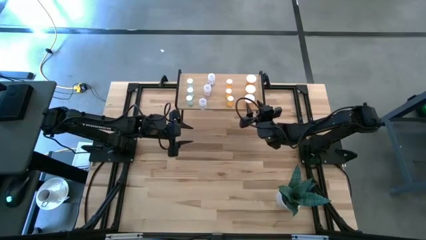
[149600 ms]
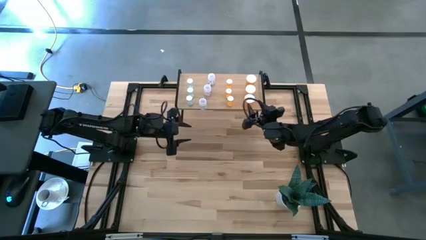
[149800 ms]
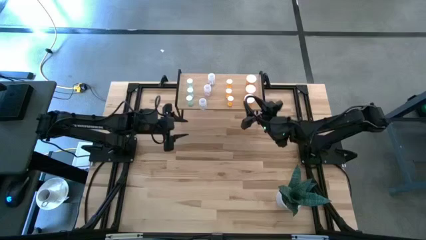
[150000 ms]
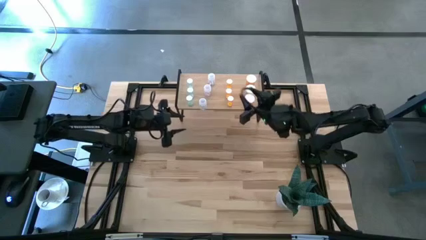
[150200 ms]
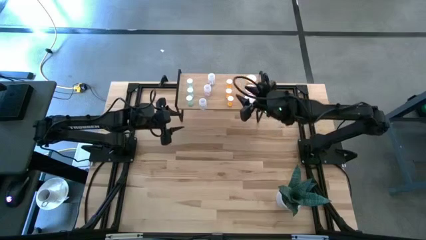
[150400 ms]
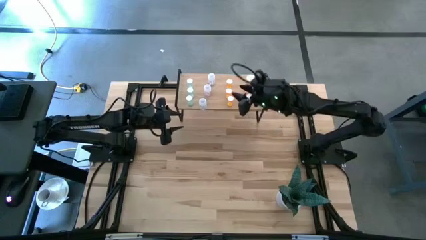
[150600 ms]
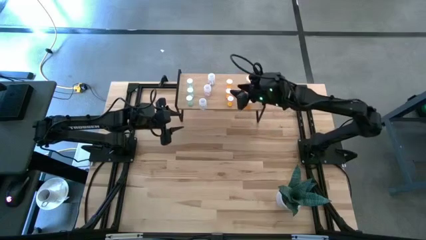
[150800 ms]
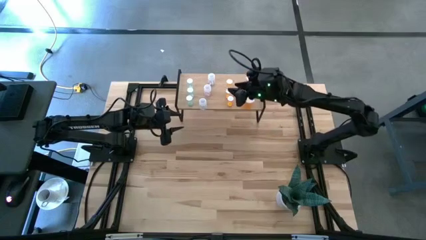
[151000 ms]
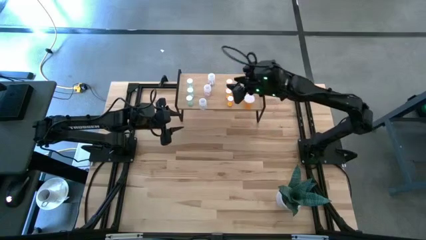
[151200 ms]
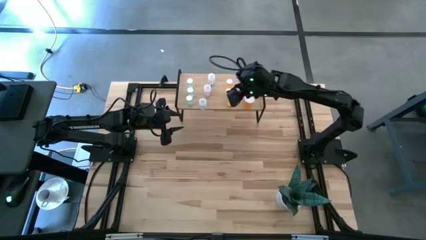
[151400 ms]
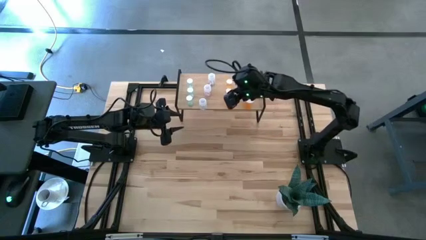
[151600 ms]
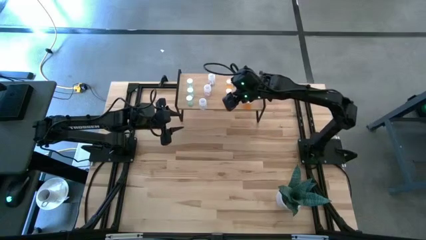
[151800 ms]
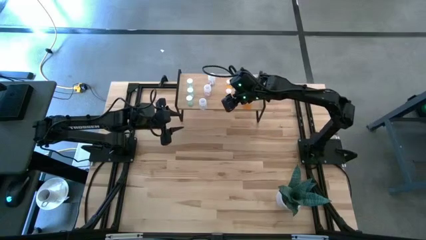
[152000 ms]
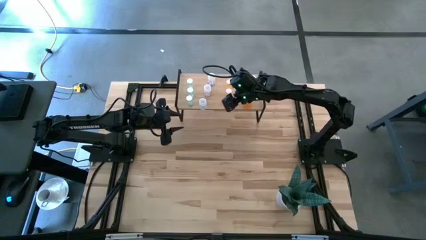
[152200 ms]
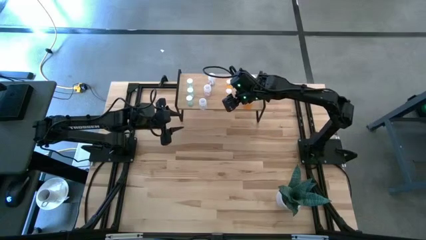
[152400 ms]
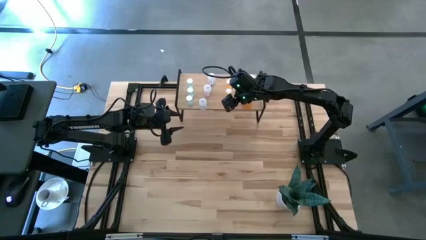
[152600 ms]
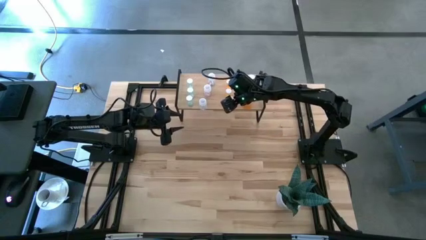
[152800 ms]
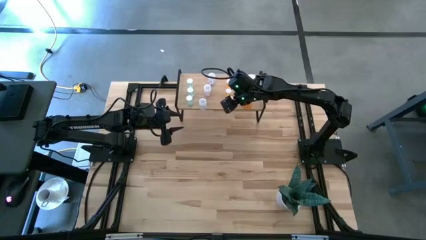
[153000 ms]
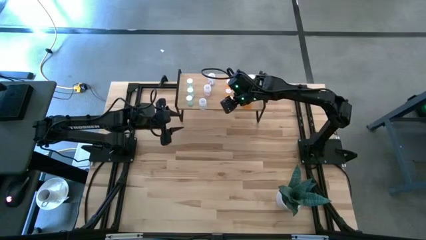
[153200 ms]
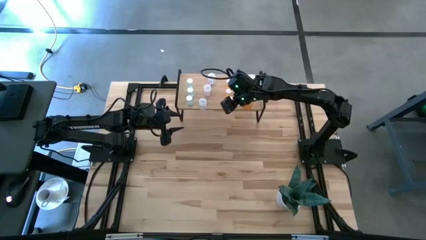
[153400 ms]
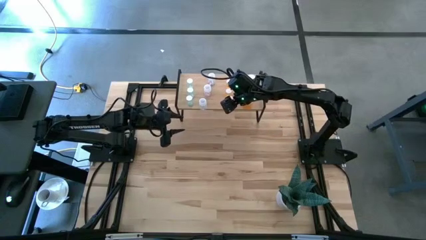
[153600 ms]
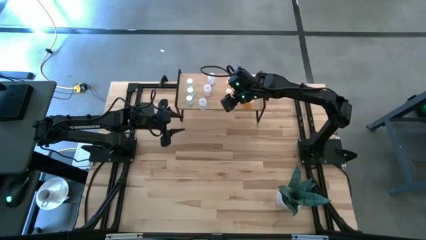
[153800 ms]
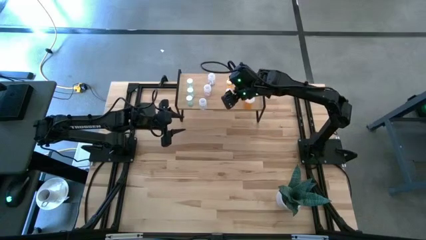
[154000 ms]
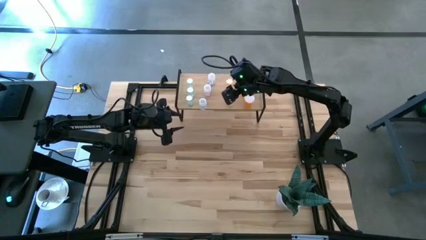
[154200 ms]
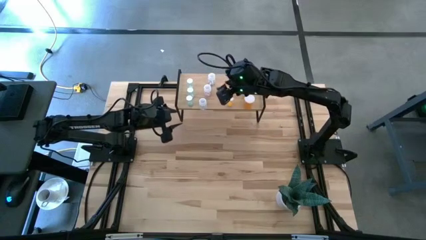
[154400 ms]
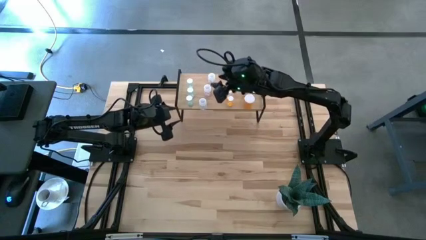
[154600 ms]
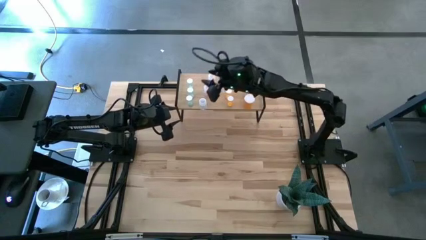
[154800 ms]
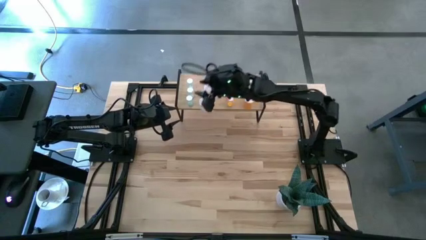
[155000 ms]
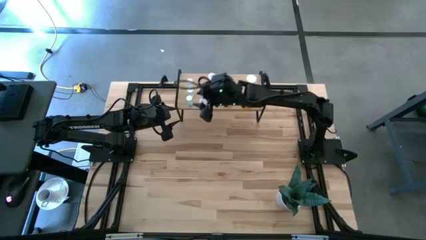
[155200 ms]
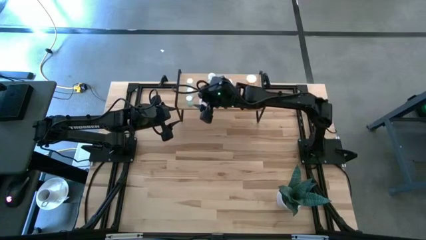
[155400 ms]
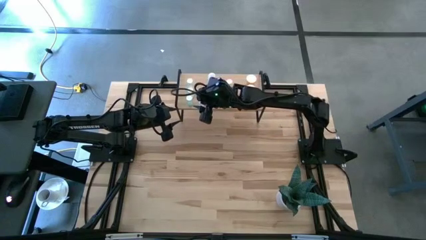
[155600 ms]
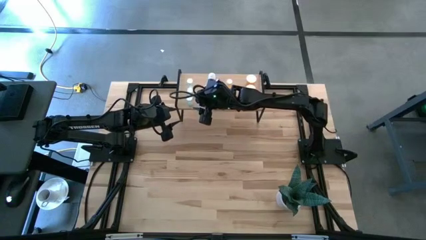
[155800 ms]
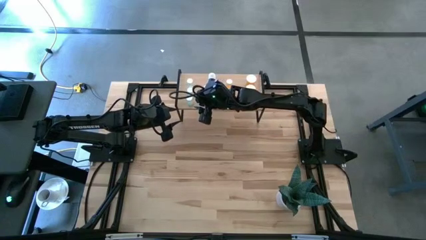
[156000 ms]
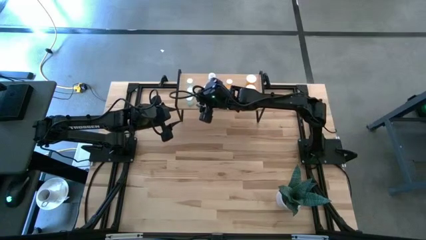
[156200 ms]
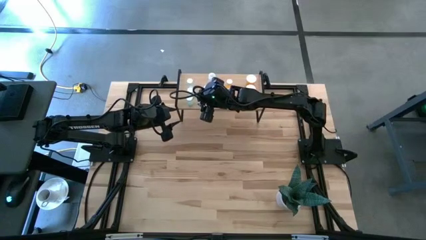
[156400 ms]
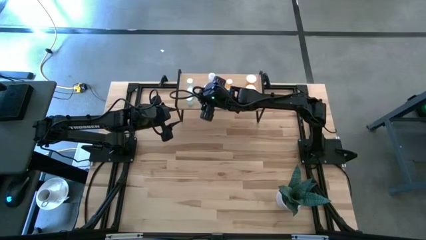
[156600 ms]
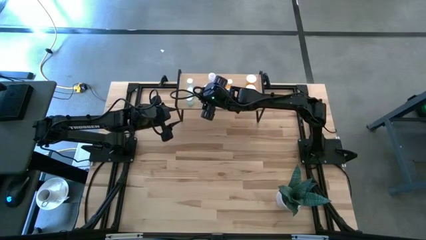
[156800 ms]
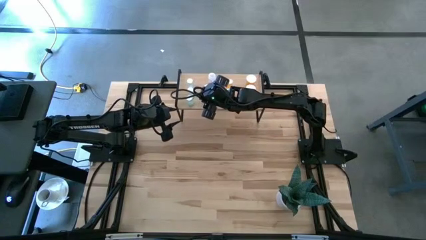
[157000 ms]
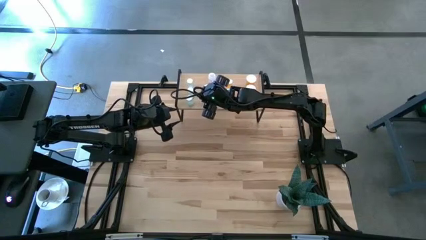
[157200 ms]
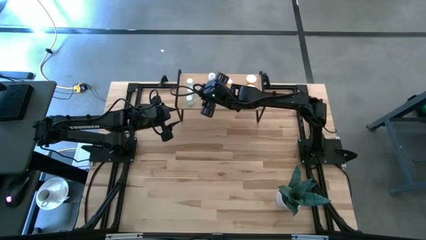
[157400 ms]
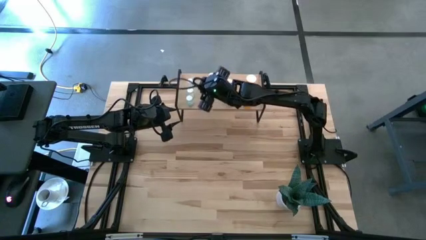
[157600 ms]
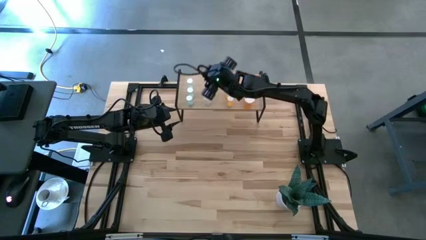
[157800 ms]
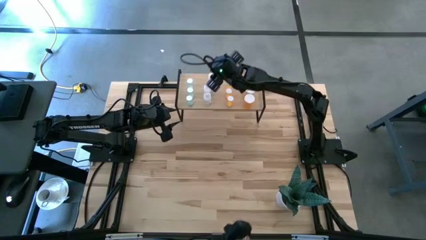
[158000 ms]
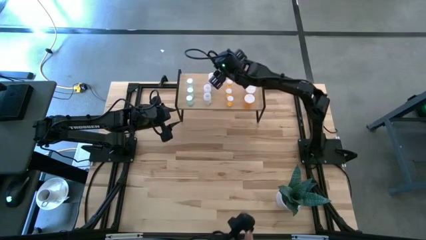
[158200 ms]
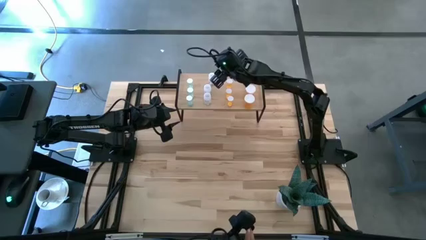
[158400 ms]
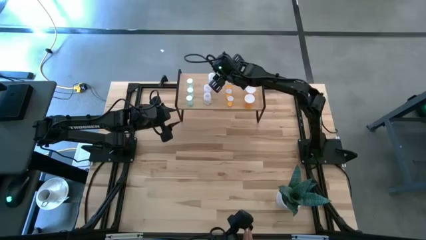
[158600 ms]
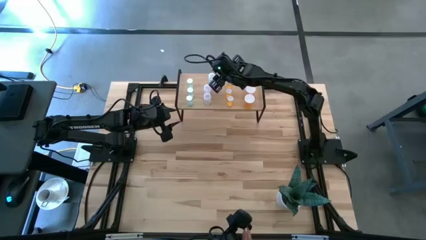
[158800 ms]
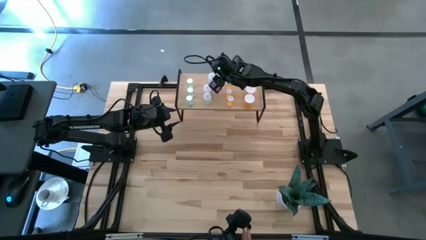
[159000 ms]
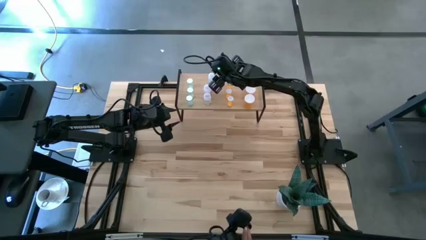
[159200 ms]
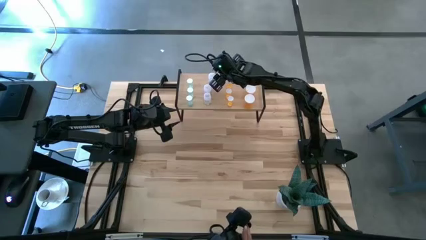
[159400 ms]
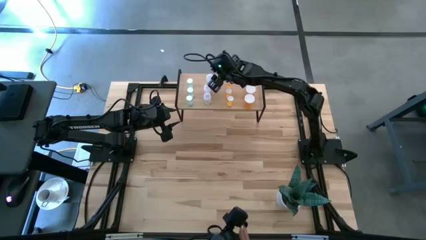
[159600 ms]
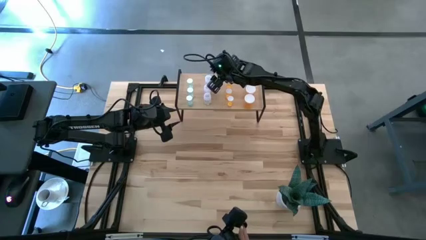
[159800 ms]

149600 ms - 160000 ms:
Task: Pick and place medicine bottles onto shelf by color
Adjust the pill bottles on the shelf

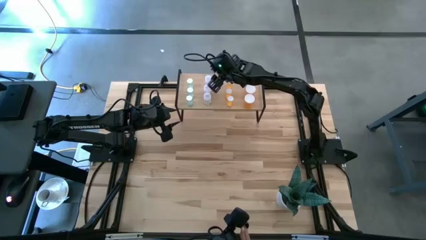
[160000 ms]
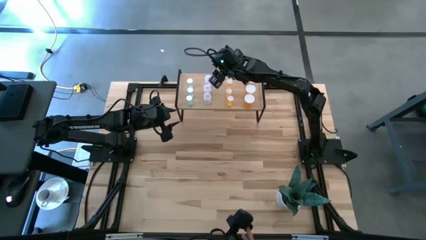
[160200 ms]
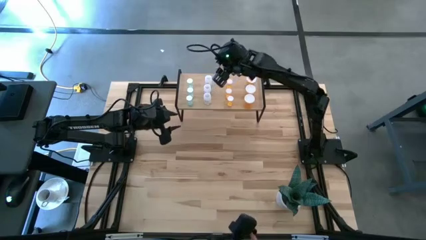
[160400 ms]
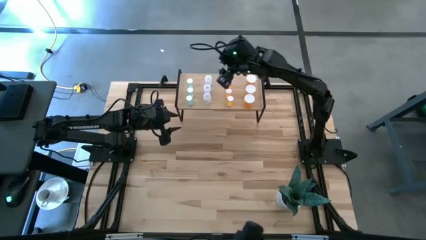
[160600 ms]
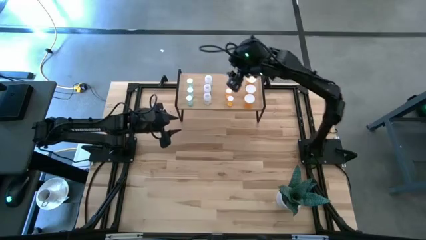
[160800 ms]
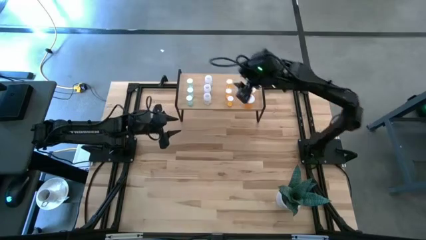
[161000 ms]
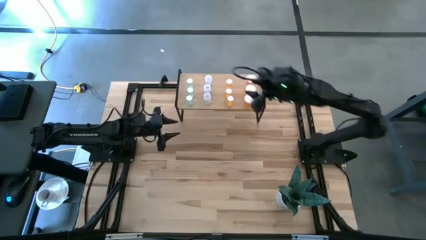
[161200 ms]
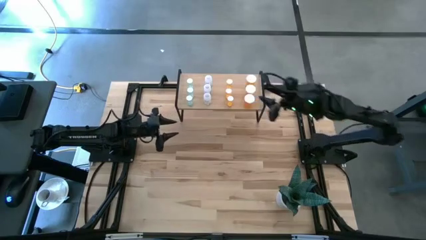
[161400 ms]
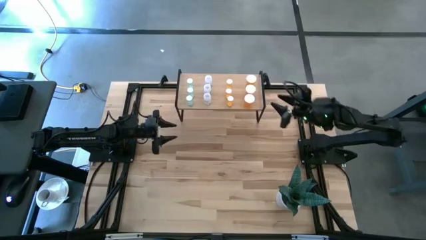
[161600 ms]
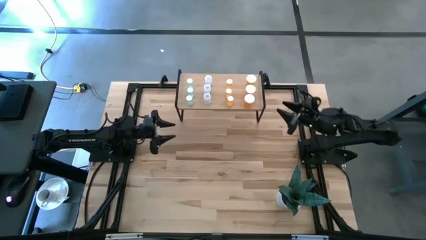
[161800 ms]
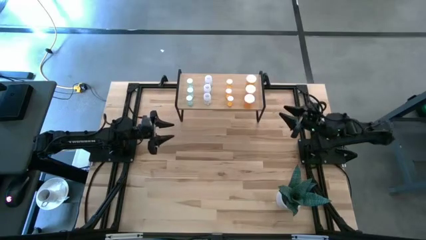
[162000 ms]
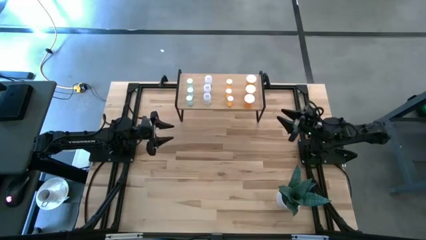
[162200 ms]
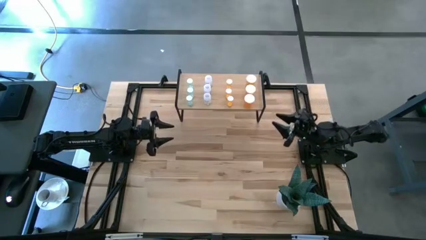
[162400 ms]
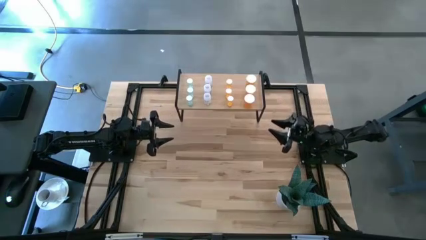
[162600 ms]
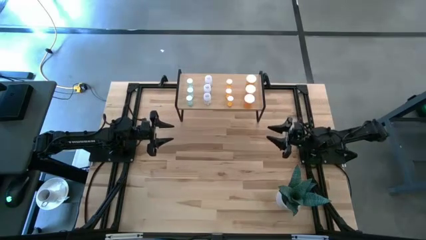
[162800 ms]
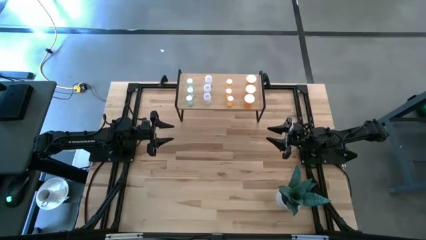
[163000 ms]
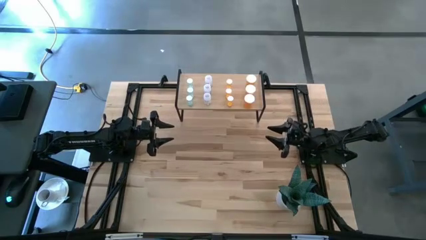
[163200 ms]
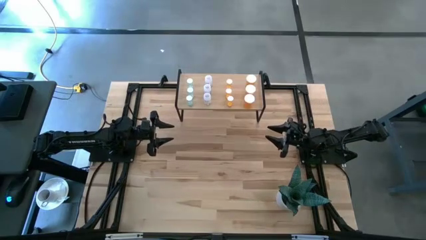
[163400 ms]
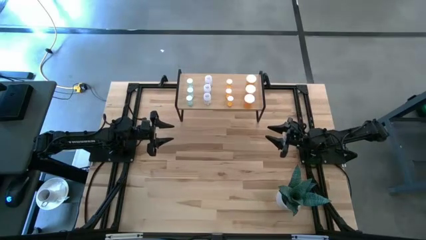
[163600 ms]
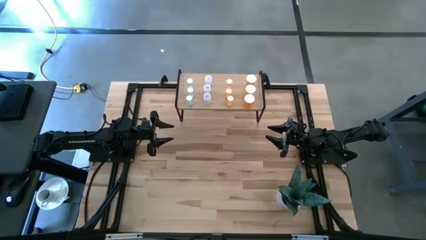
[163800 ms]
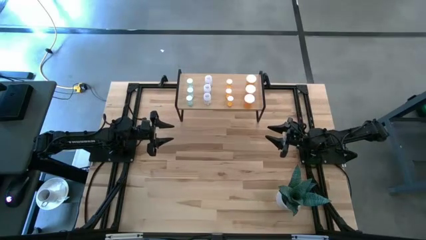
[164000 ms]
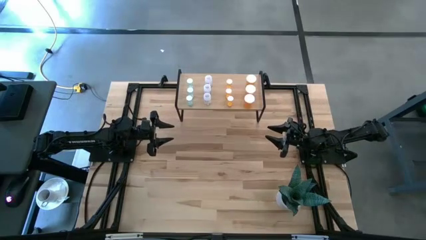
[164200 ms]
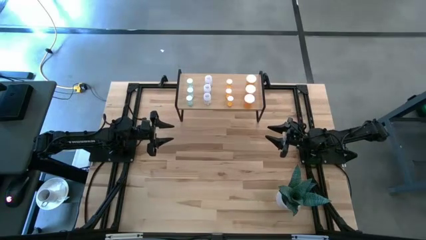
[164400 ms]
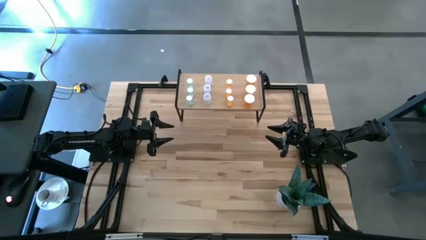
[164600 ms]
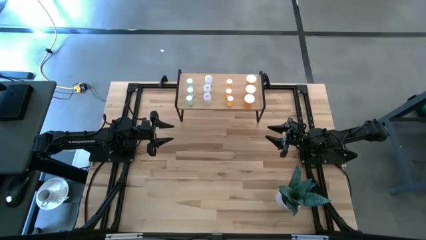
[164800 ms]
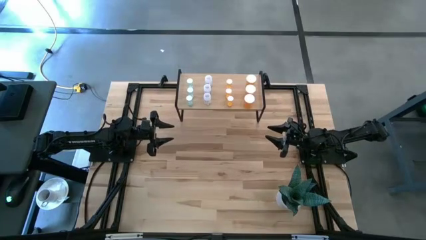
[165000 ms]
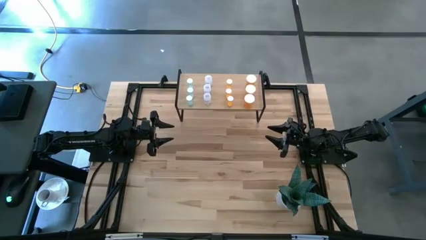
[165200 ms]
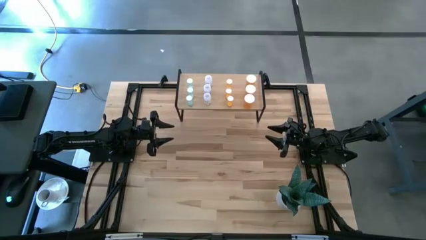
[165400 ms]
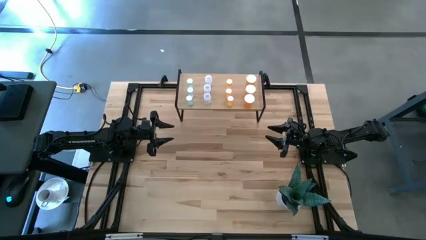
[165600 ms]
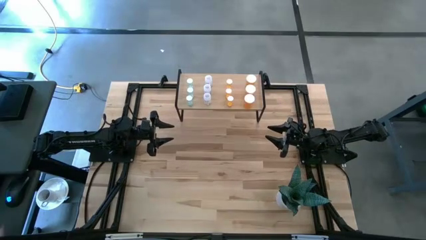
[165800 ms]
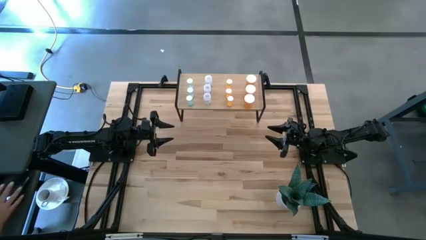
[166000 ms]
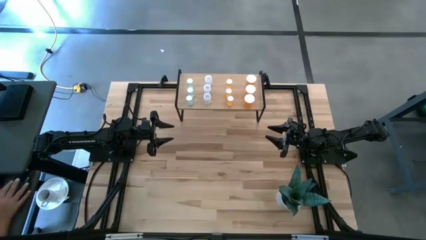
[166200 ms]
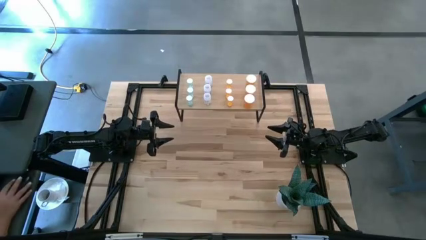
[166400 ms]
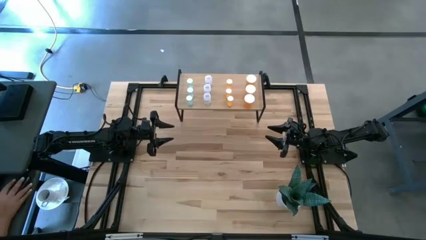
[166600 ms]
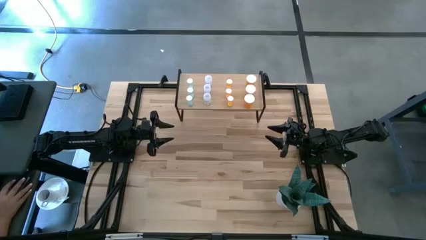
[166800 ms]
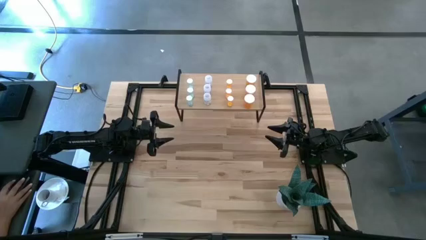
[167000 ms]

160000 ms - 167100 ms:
Return to Home Position
